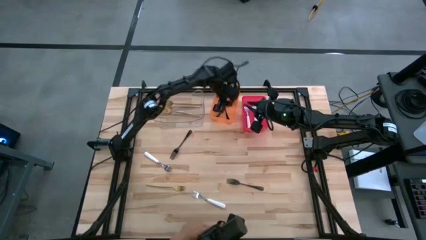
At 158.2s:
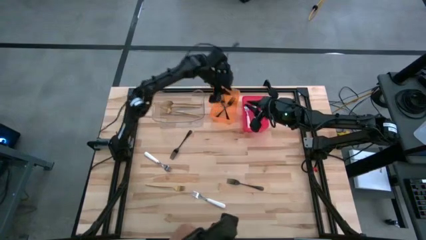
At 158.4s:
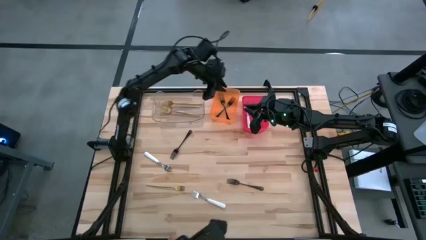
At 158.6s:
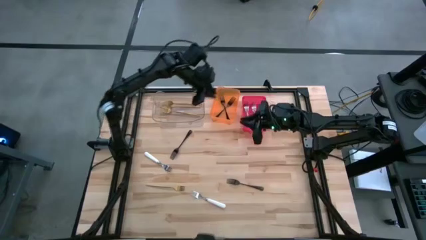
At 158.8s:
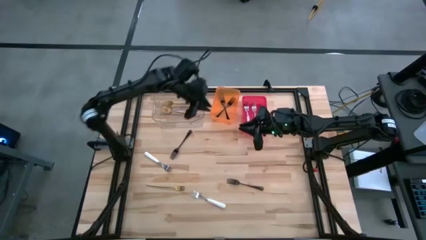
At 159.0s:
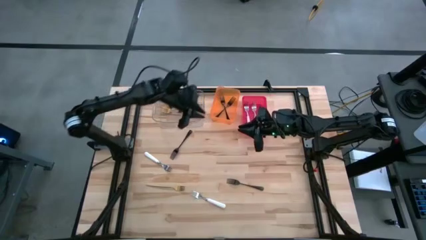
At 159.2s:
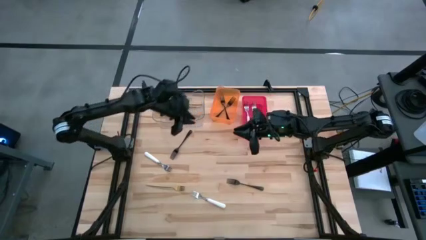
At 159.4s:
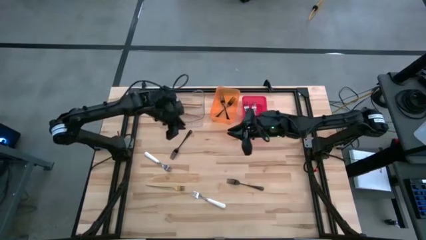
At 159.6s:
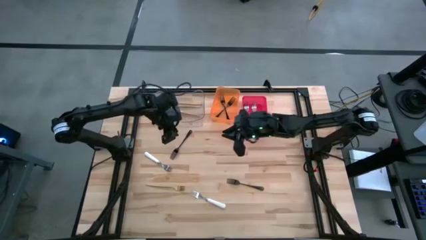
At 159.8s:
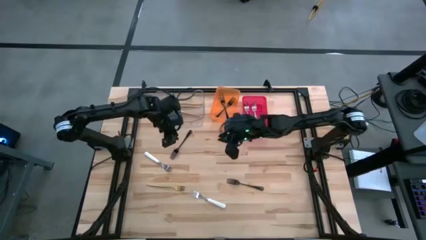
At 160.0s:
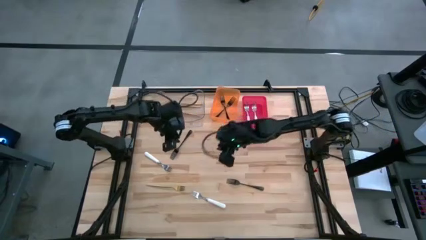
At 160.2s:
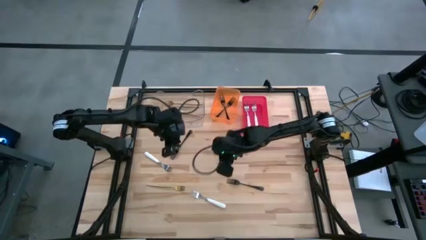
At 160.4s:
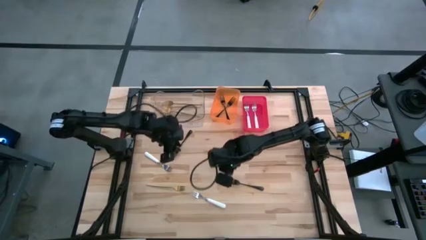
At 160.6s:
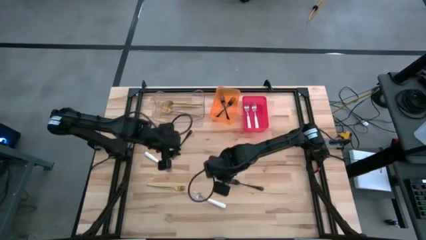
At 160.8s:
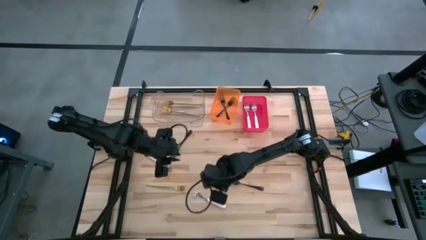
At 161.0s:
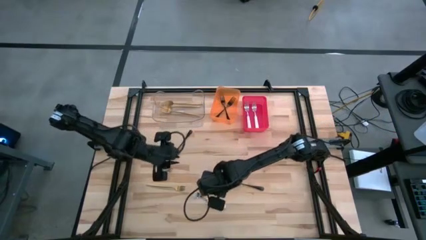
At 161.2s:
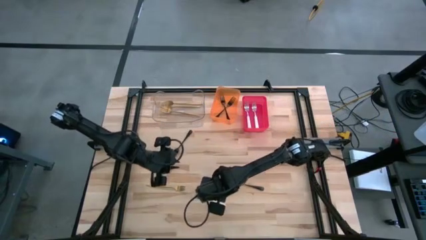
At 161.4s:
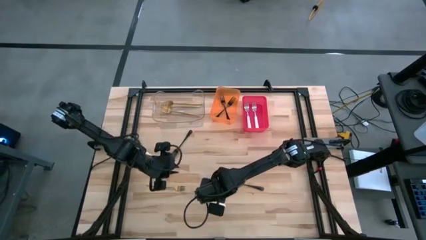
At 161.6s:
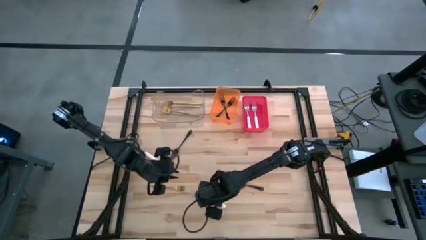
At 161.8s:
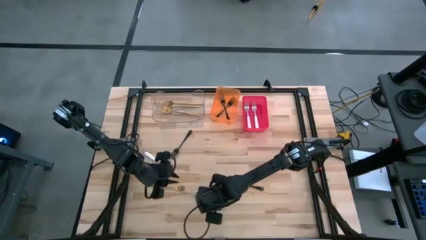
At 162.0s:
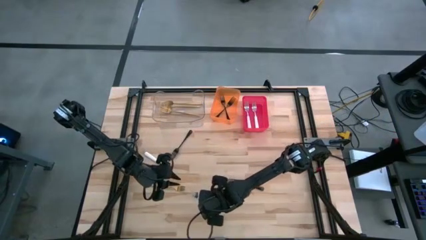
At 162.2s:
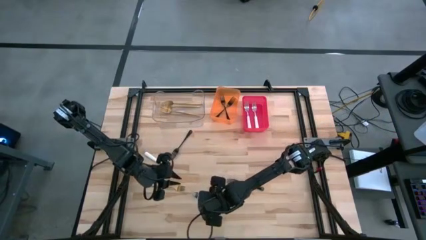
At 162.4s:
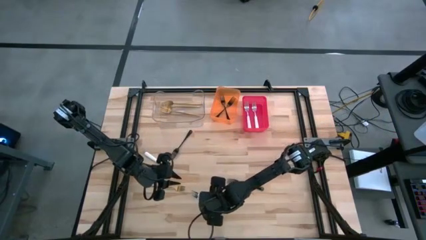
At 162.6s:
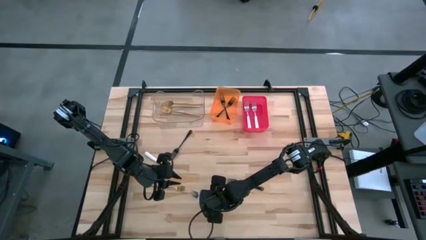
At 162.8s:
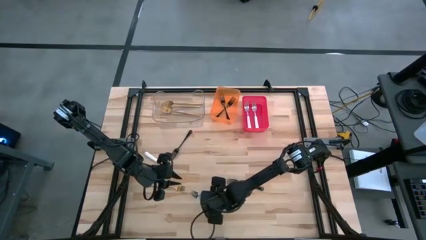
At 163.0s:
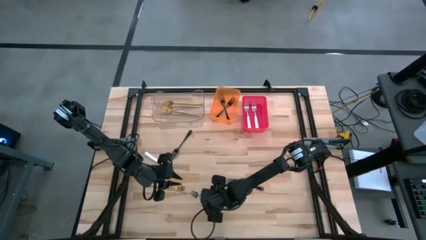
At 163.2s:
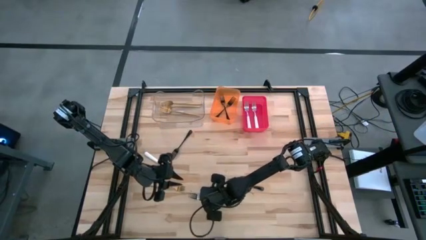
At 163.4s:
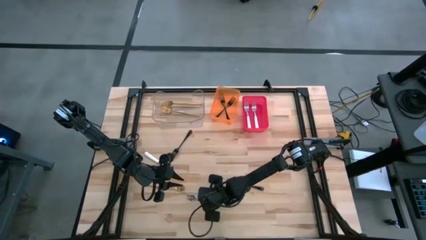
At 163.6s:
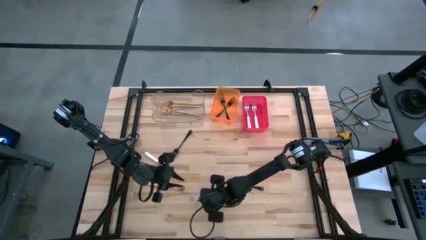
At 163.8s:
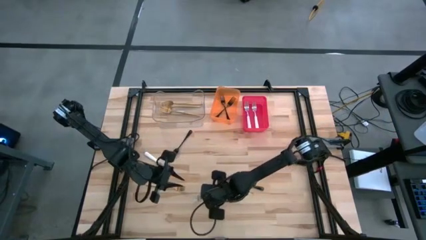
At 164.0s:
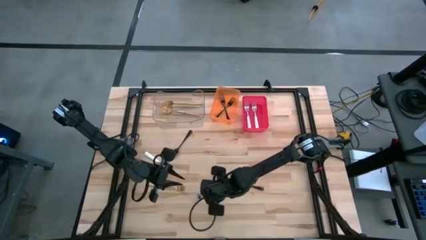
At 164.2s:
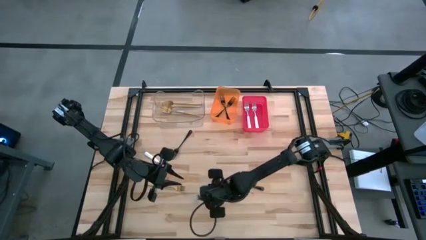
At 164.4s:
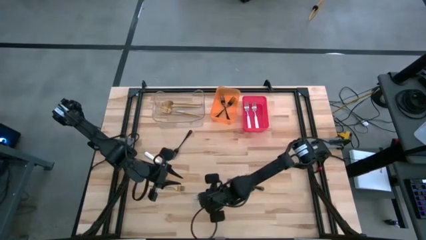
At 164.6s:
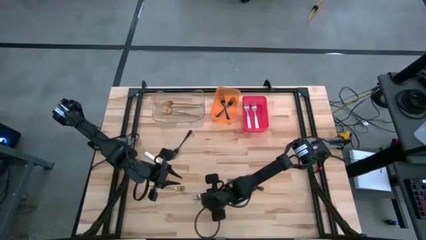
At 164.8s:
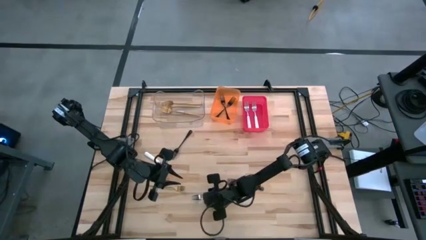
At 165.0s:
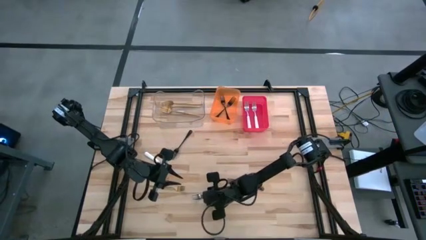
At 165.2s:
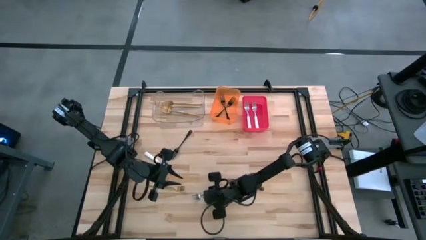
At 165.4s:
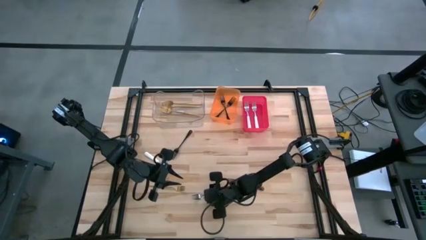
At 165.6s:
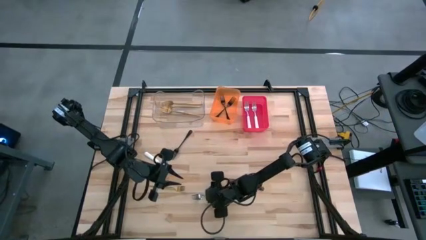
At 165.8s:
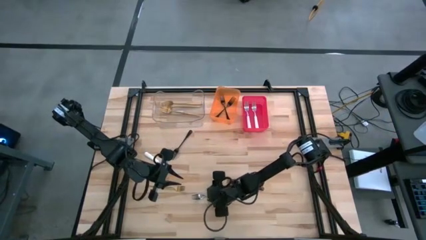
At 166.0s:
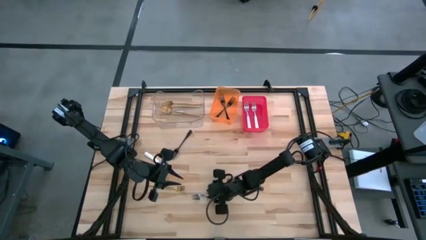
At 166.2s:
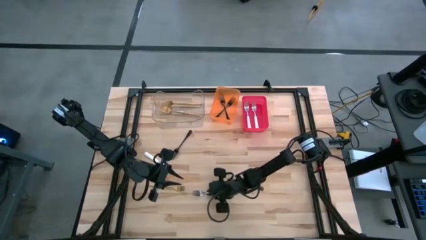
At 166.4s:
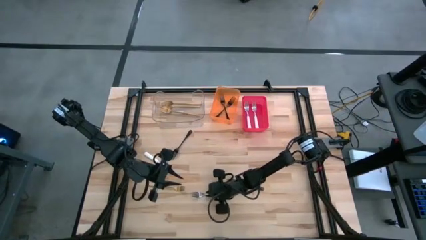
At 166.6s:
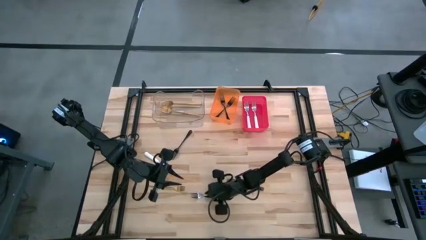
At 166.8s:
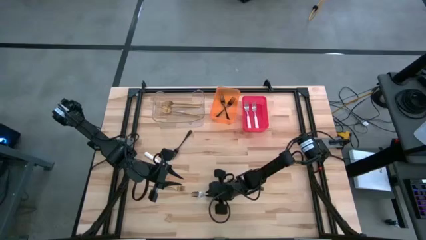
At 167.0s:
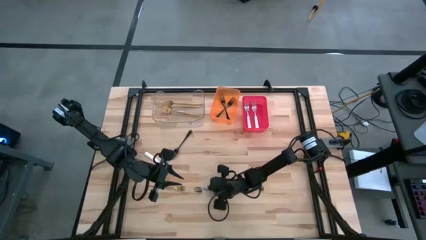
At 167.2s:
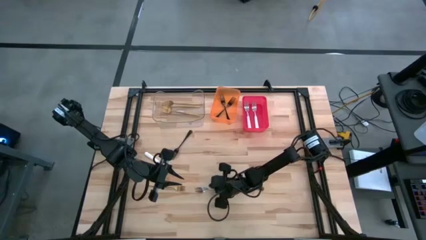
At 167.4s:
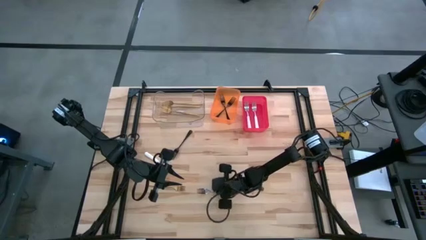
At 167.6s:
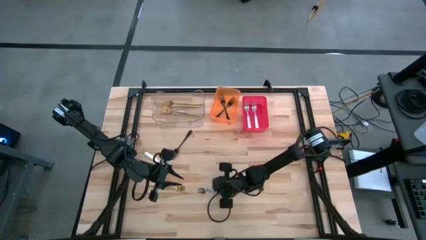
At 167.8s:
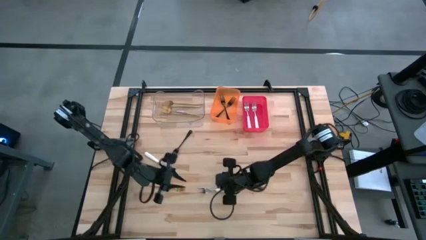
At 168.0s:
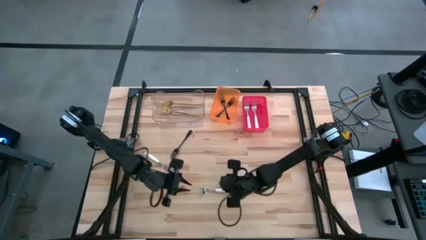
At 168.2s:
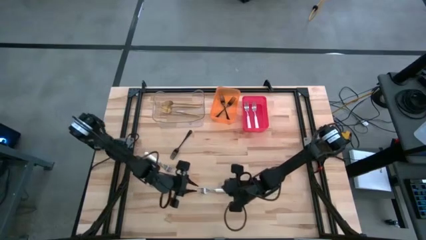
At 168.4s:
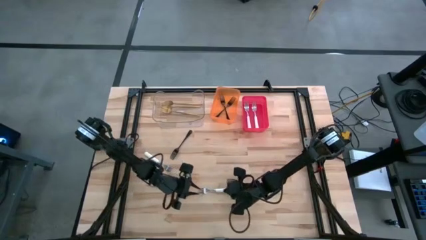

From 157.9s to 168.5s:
Task: Sort silverware by color (type)
Put the white fork into the red bin
